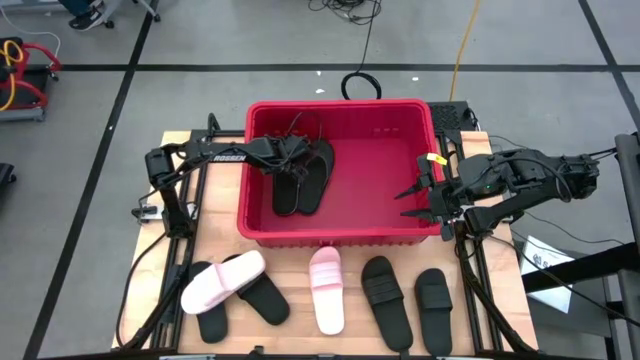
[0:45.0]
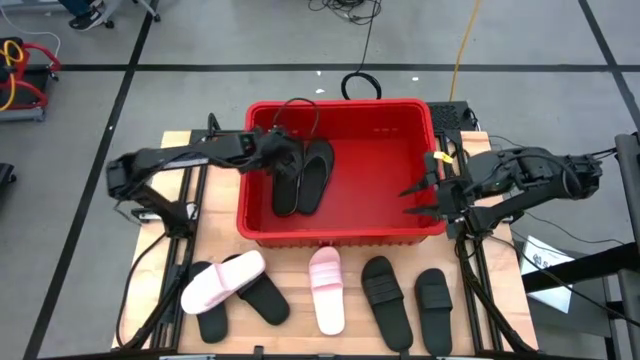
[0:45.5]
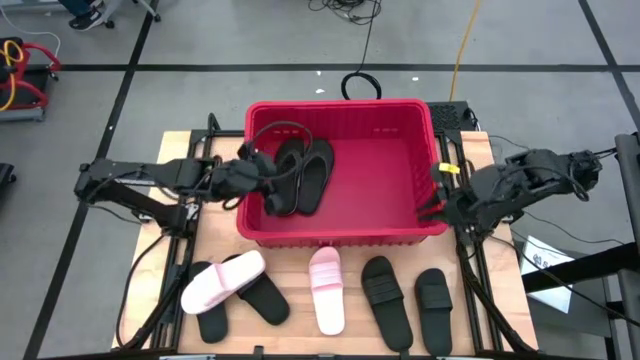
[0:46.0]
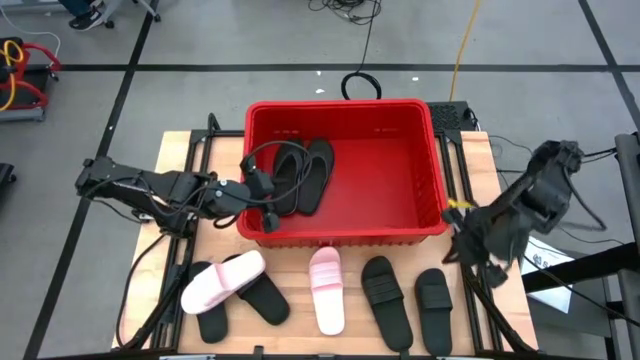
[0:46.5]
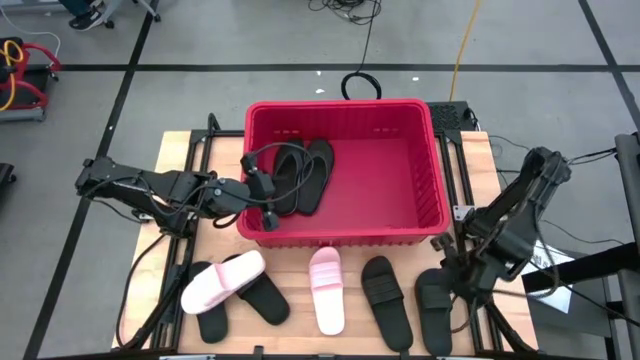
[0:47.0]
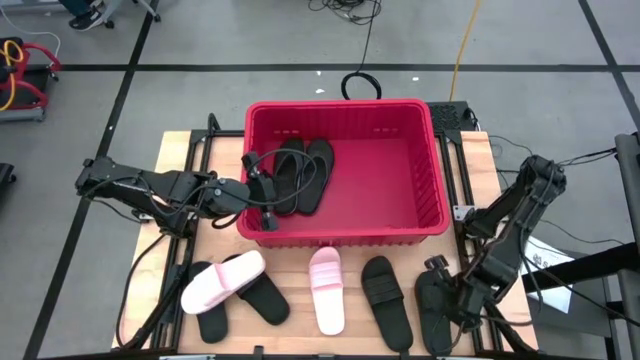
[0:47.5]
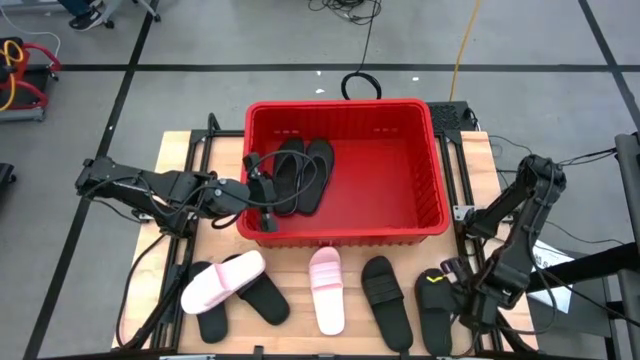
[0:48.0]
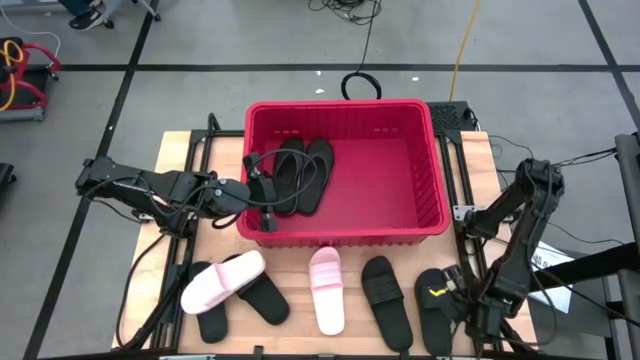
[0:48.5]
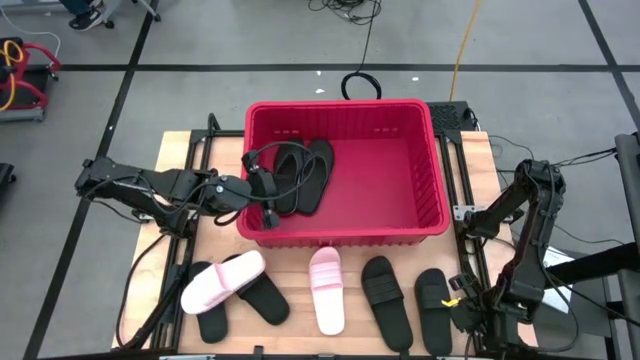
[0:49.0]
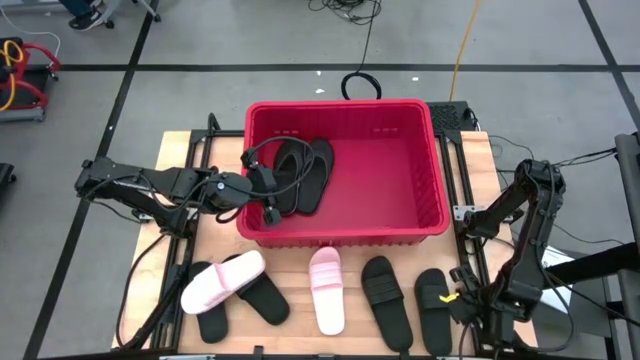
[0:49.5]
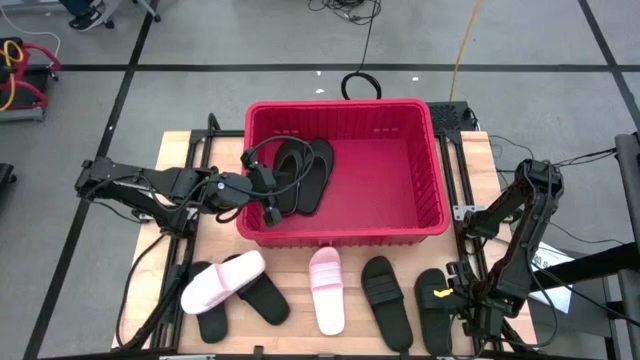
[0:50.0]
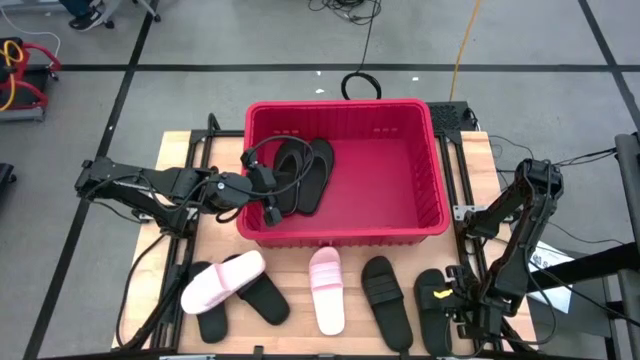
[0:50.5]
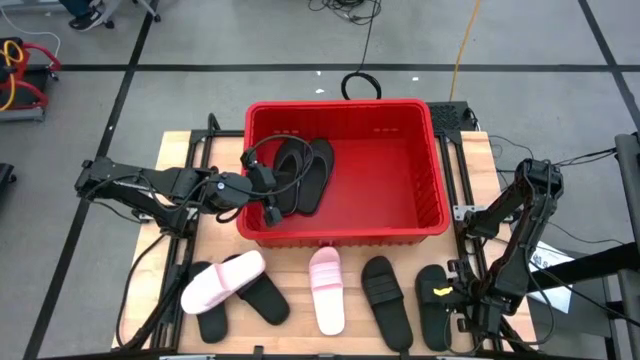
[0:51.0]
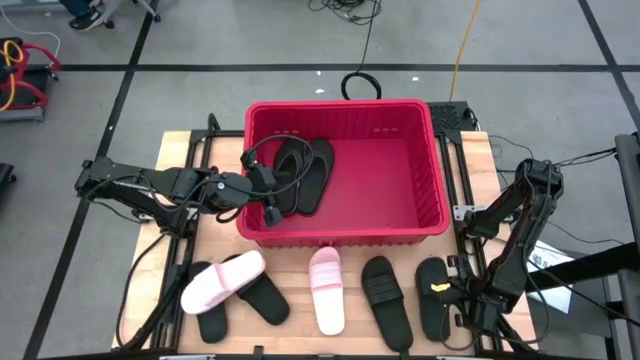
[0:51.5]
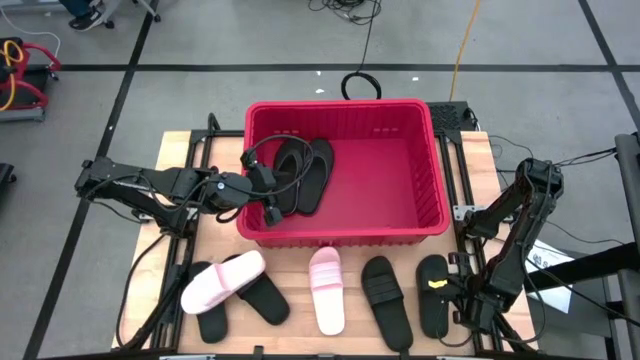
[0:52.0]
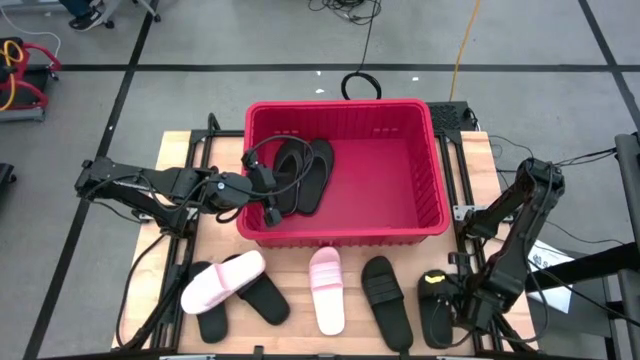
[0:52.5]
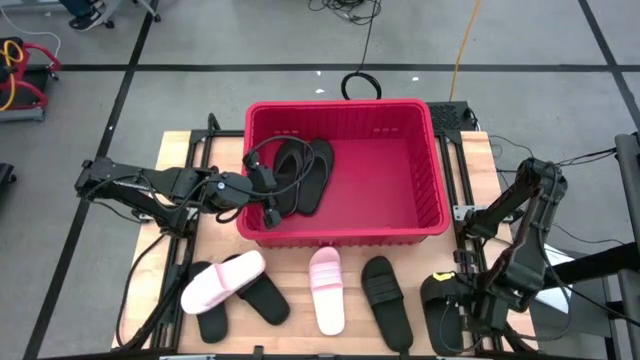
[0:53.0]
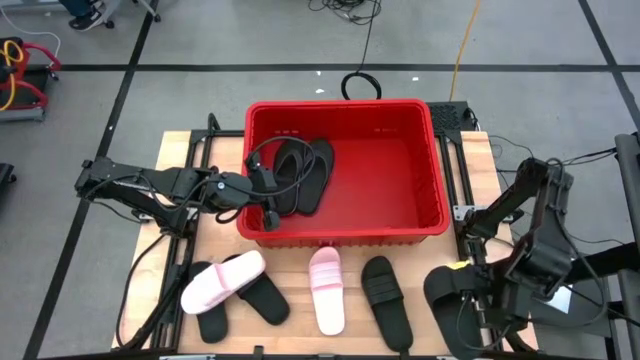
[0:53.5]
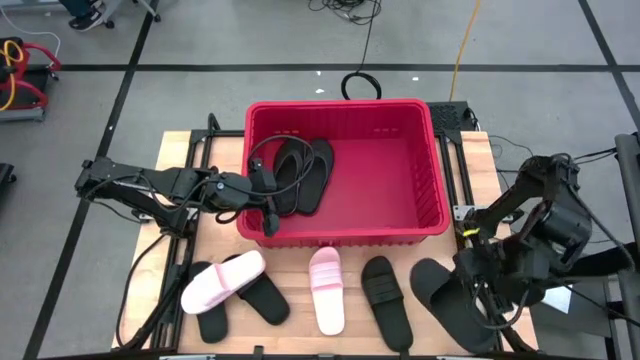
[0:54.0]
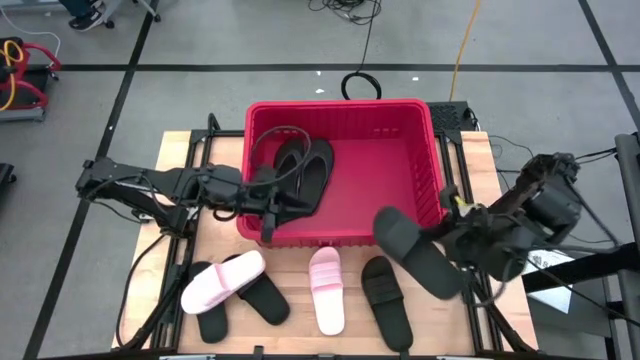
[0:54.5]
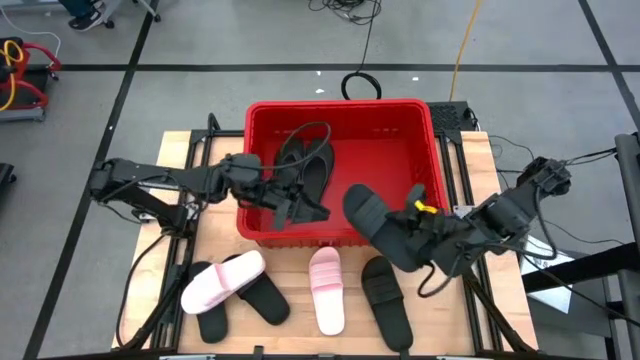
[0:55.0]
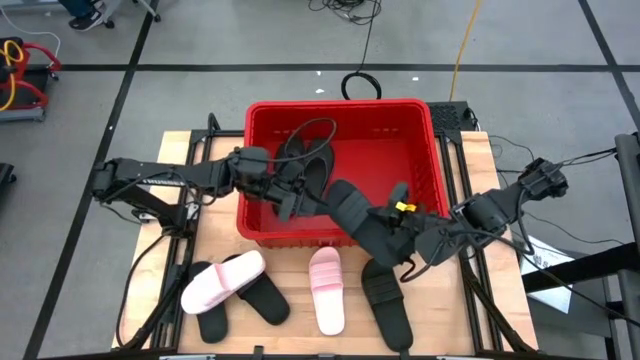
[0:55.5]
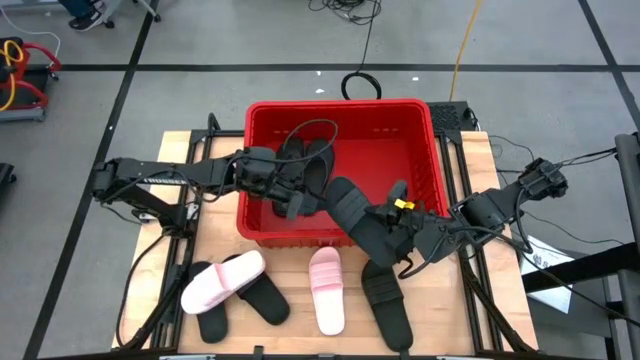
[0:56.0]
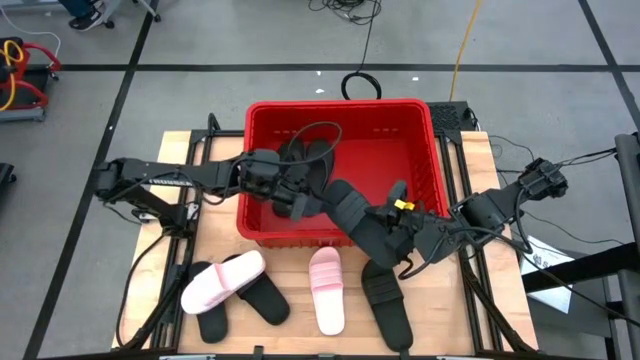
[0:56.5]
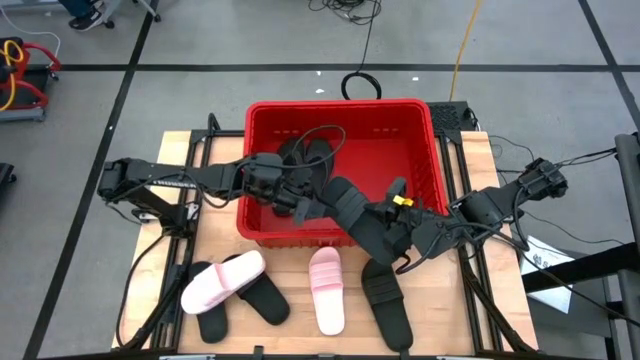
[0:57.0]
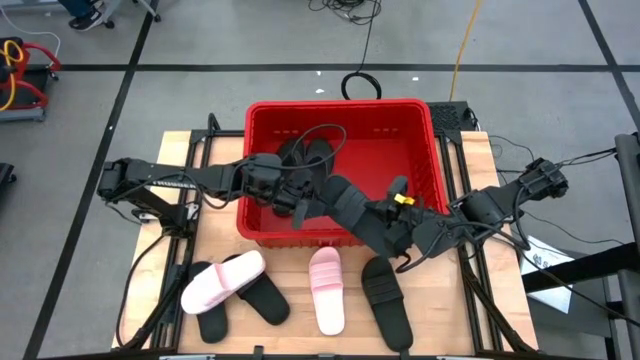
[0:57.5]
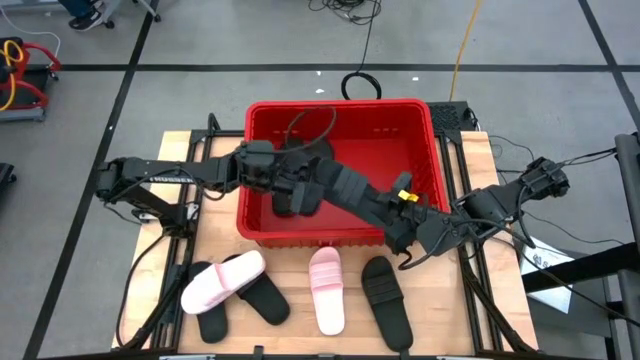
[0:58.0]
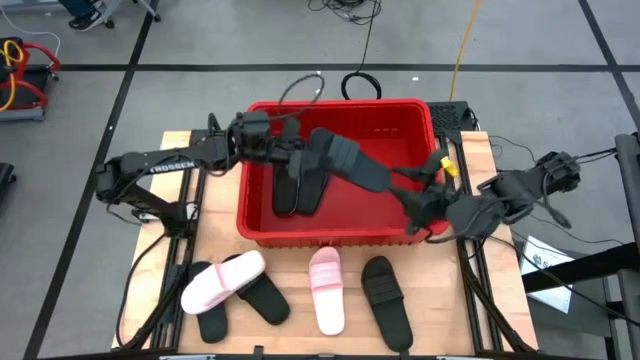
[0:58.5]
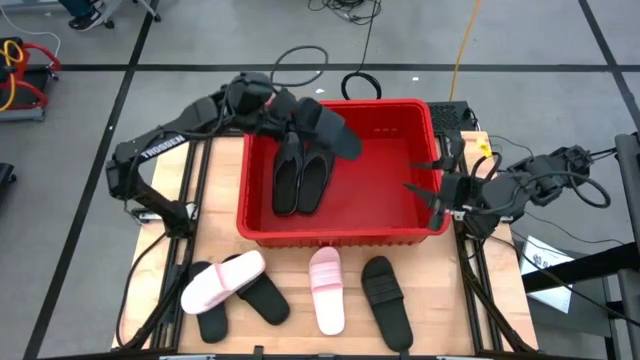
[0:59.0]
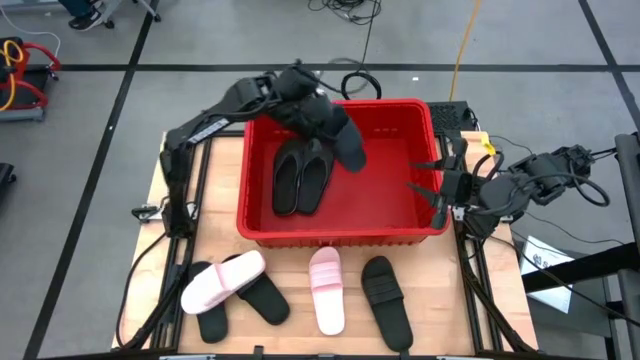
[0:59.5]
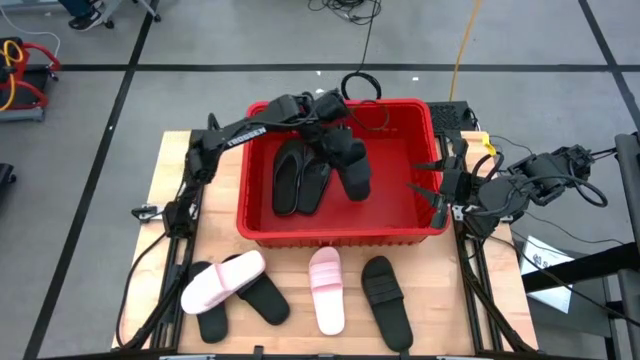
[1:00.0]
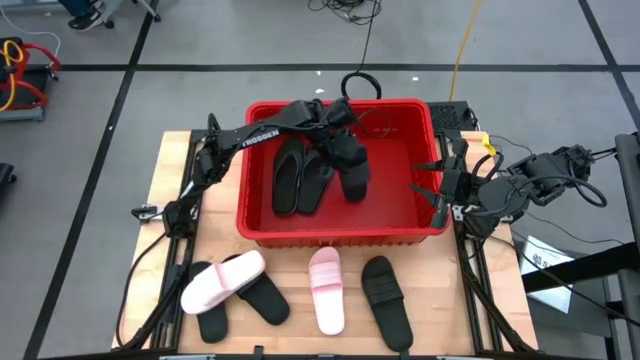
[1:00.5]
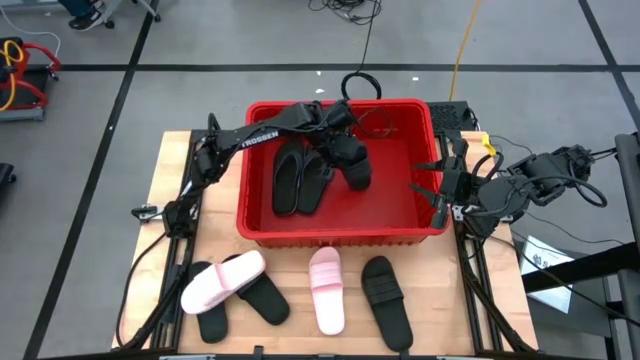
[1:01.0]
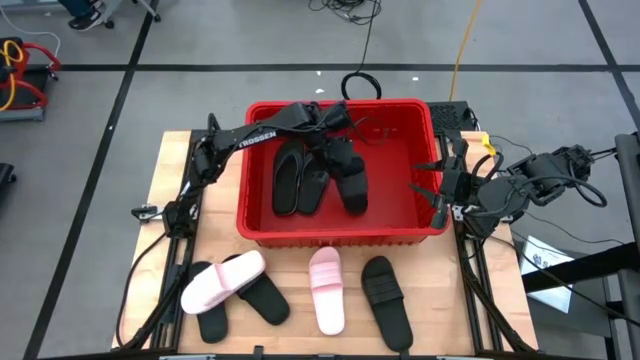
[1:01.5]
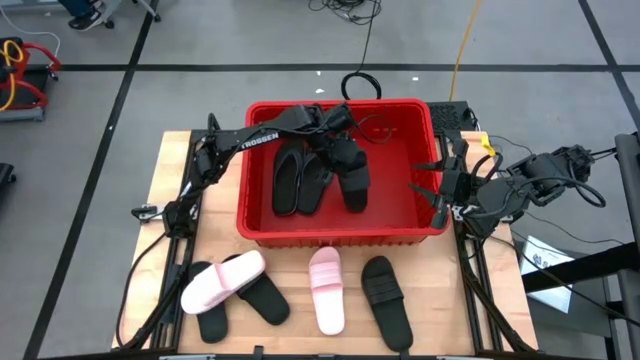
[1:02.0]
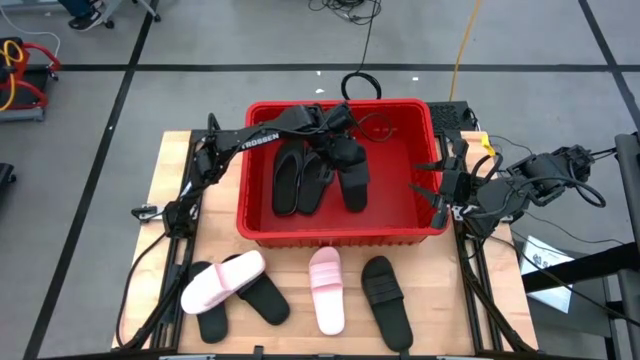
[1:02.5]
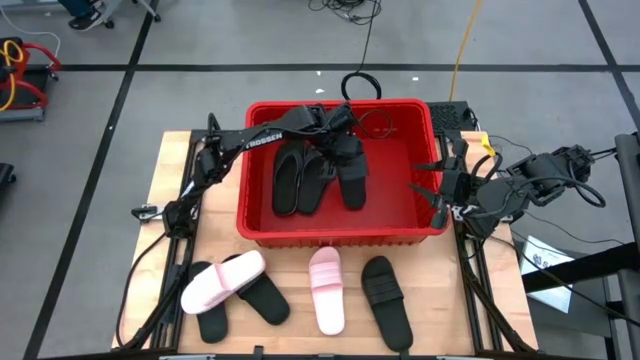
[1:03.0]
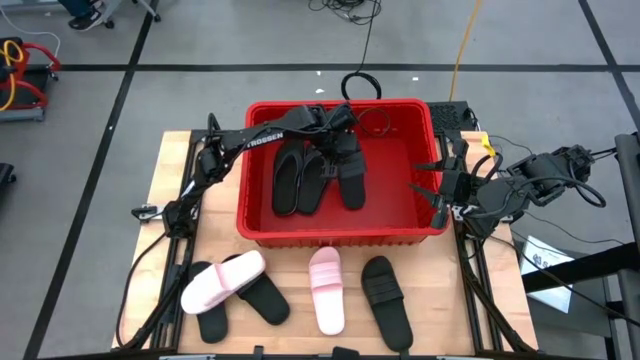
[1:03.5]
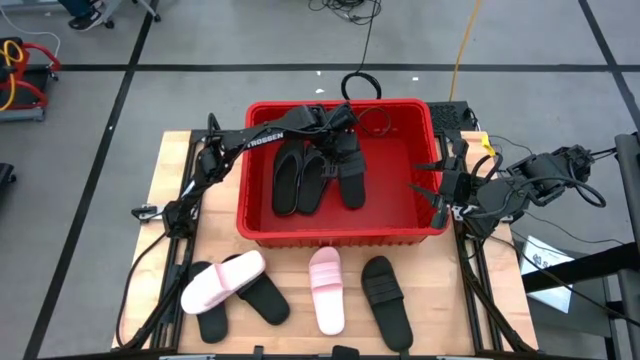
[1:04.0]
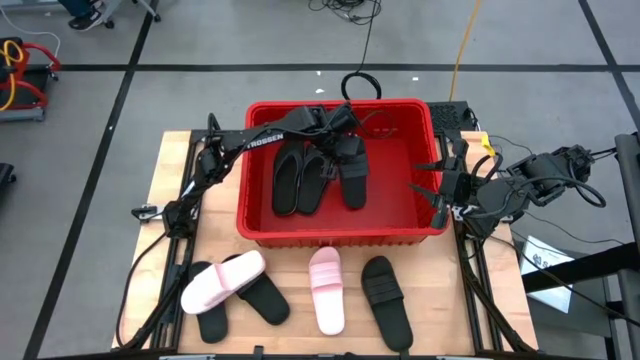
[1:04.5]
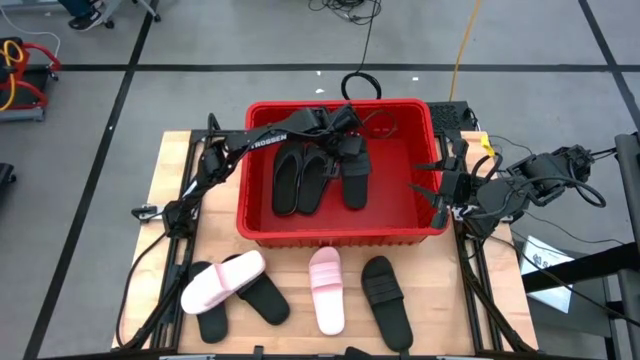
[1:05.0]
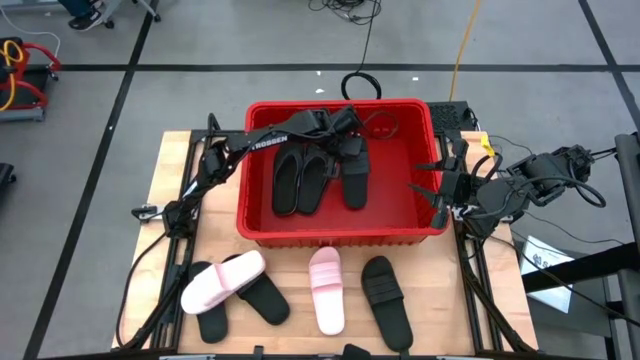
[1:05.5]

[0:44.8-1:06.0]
Task: Pick and place slides into bin
Put the black slide into the red bin
